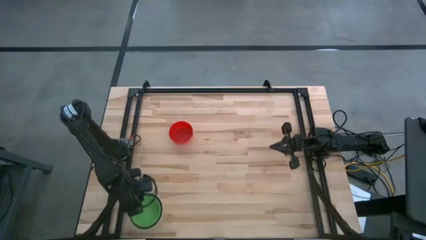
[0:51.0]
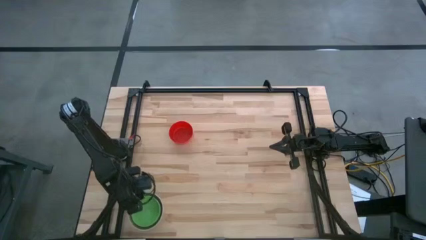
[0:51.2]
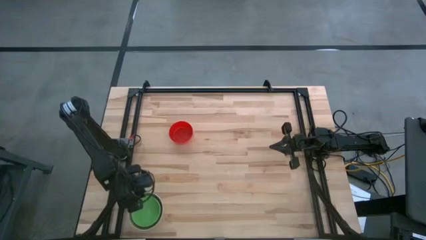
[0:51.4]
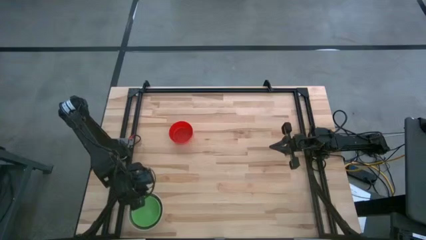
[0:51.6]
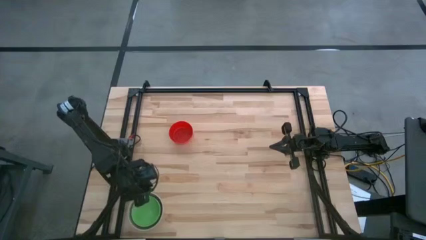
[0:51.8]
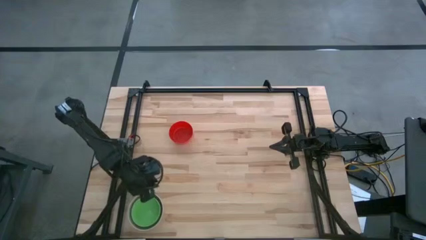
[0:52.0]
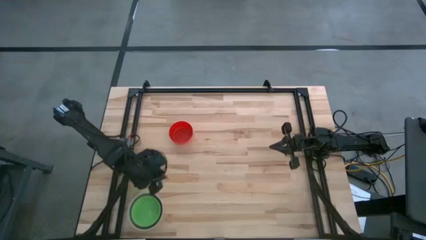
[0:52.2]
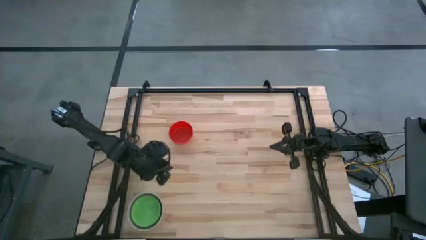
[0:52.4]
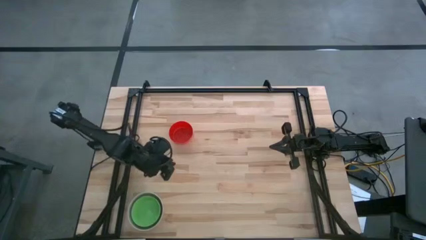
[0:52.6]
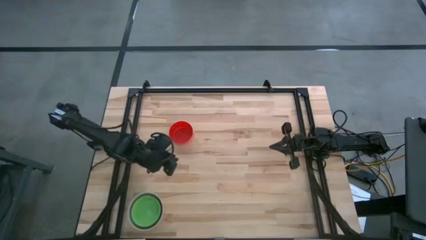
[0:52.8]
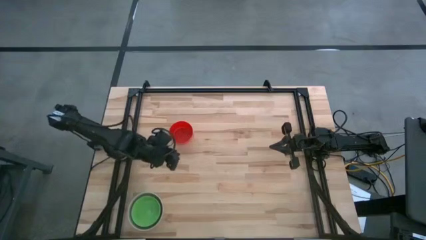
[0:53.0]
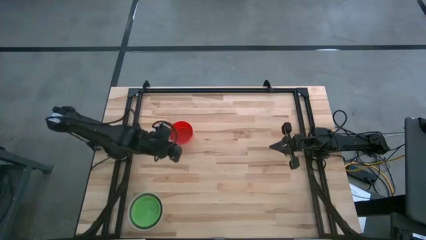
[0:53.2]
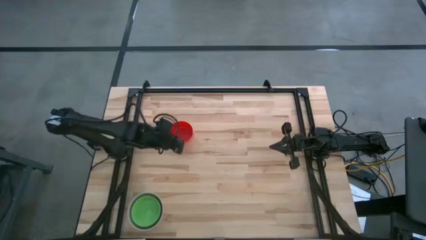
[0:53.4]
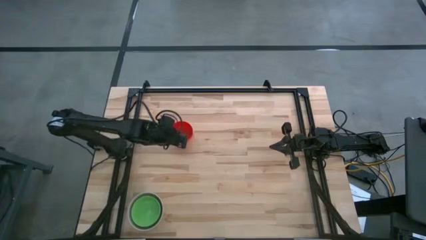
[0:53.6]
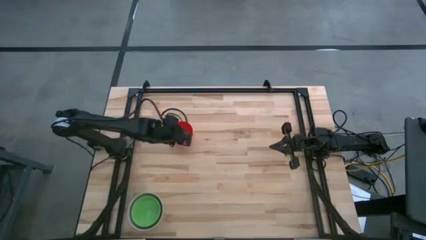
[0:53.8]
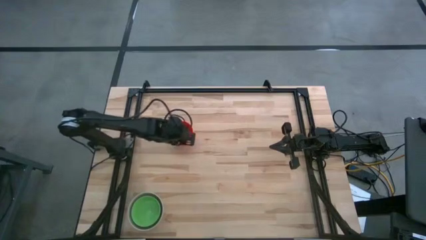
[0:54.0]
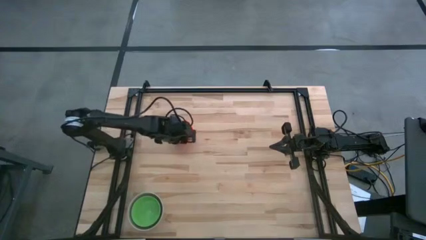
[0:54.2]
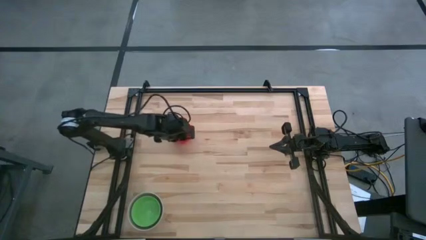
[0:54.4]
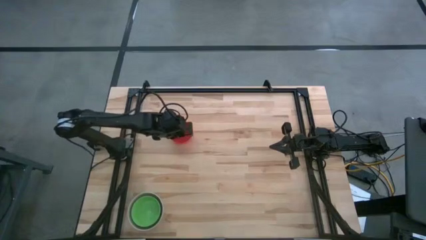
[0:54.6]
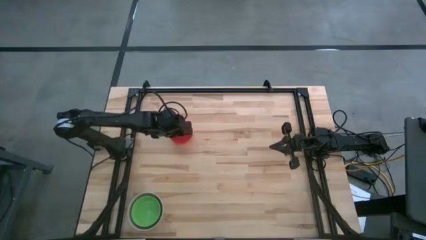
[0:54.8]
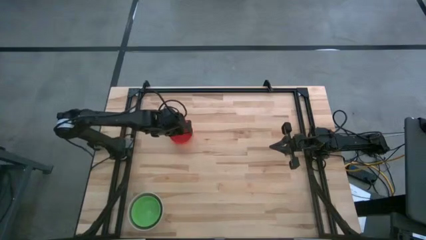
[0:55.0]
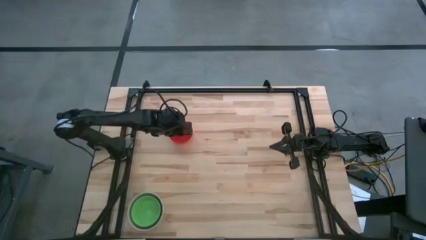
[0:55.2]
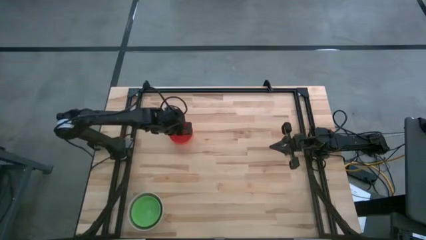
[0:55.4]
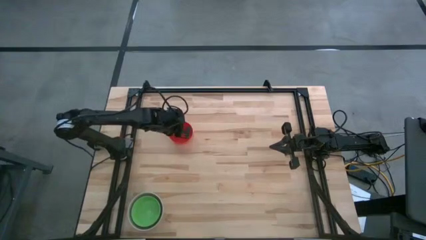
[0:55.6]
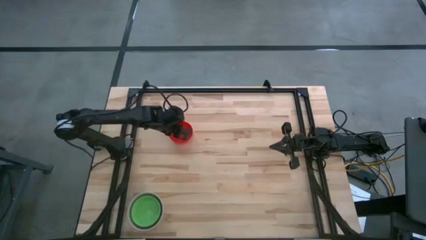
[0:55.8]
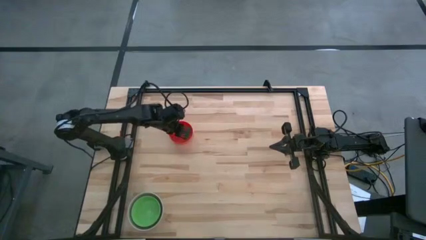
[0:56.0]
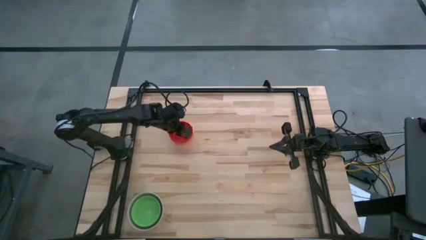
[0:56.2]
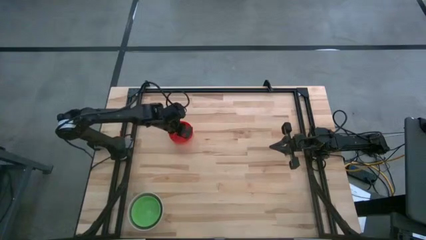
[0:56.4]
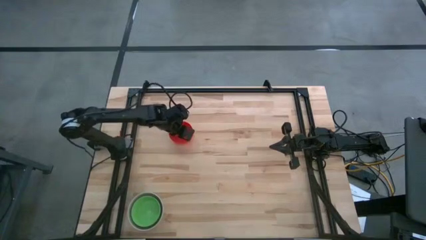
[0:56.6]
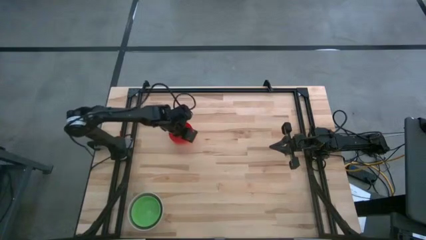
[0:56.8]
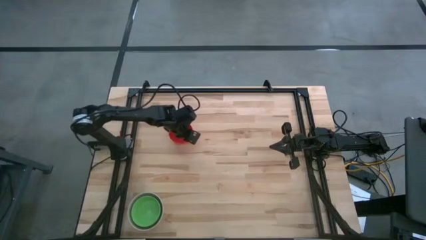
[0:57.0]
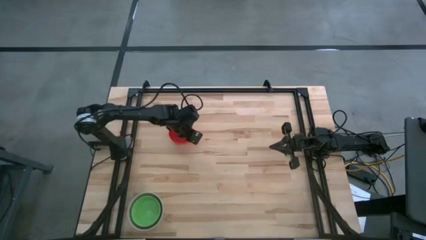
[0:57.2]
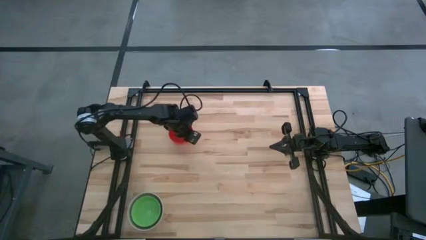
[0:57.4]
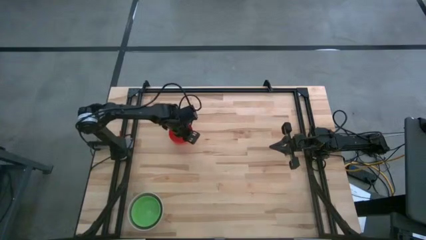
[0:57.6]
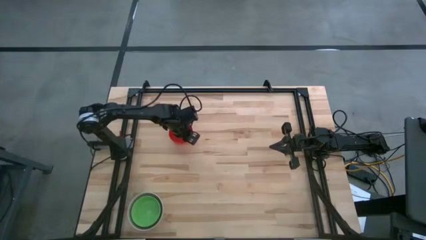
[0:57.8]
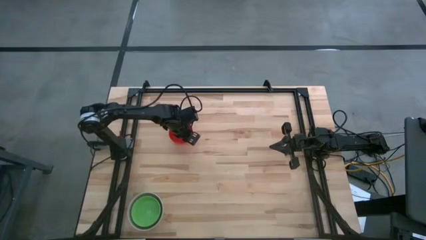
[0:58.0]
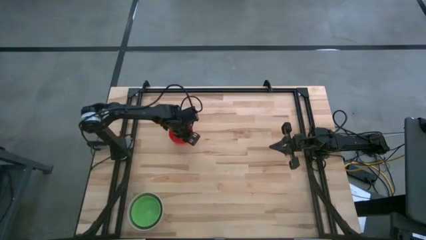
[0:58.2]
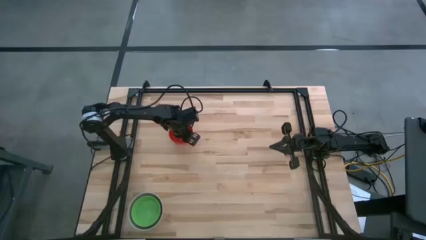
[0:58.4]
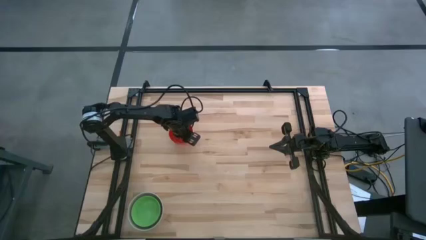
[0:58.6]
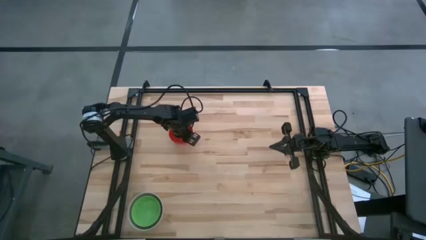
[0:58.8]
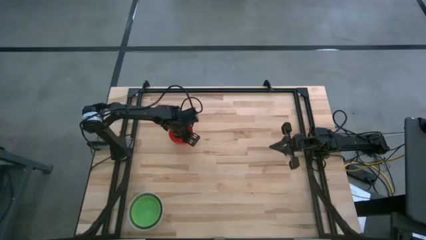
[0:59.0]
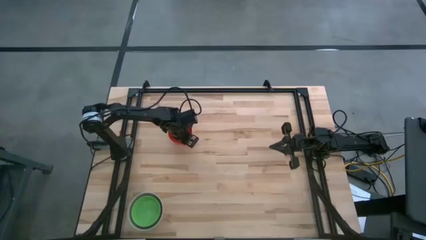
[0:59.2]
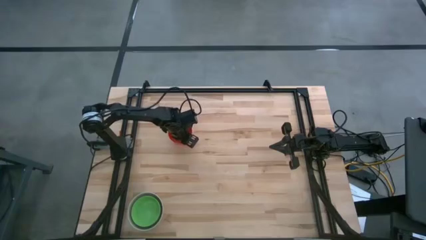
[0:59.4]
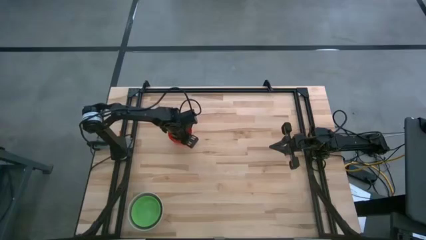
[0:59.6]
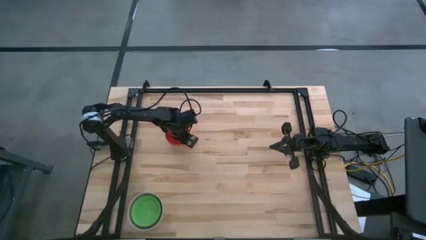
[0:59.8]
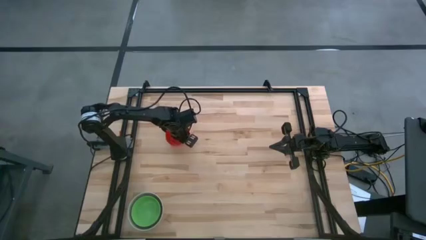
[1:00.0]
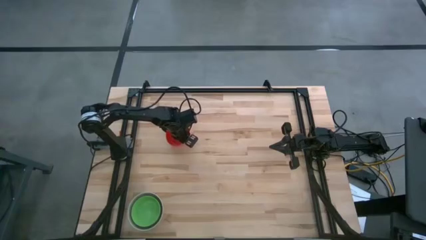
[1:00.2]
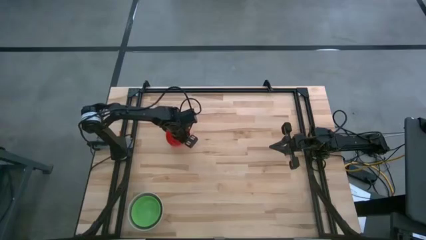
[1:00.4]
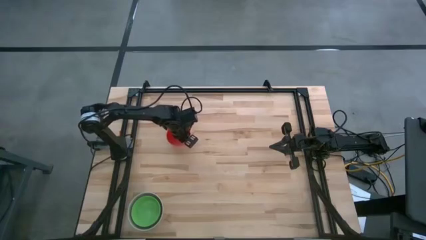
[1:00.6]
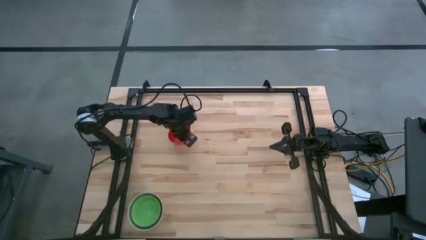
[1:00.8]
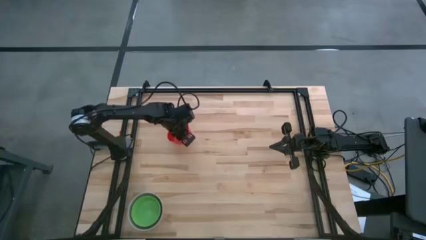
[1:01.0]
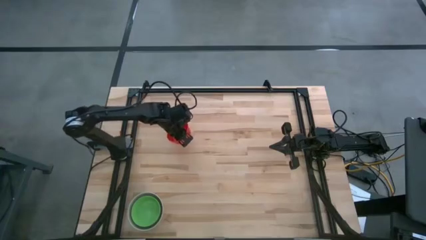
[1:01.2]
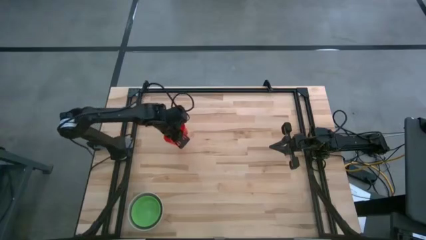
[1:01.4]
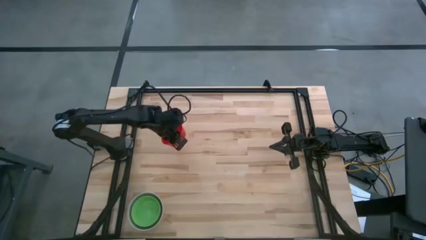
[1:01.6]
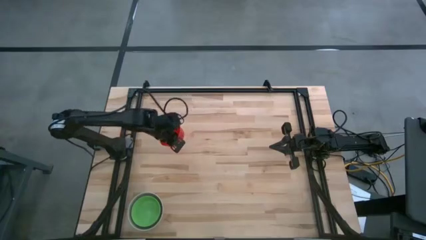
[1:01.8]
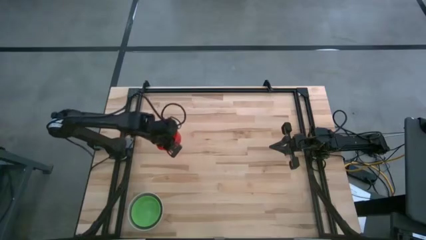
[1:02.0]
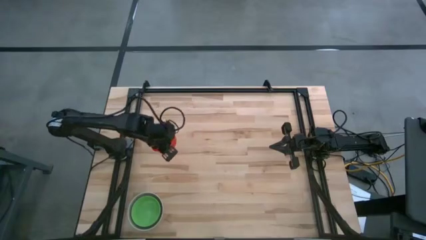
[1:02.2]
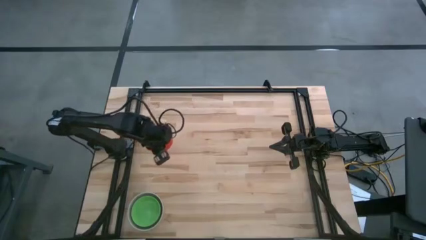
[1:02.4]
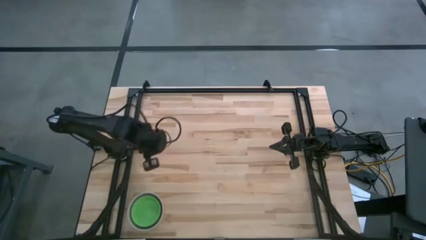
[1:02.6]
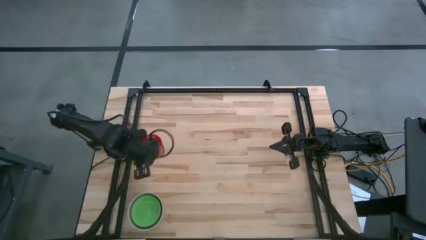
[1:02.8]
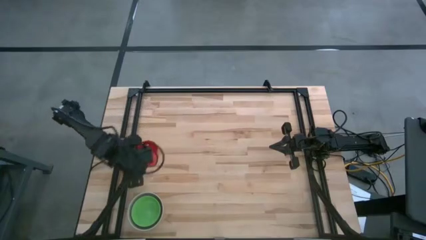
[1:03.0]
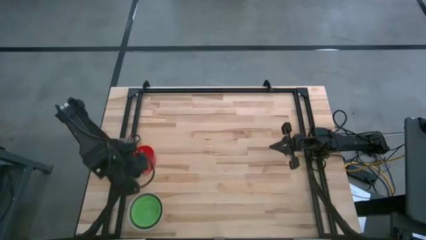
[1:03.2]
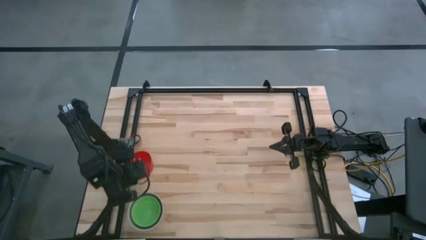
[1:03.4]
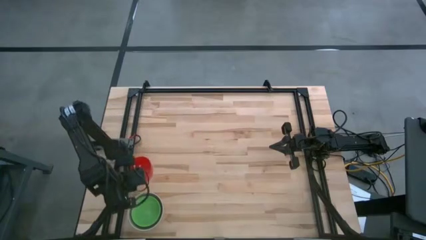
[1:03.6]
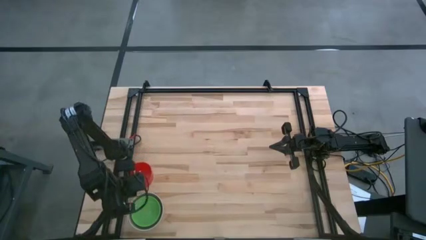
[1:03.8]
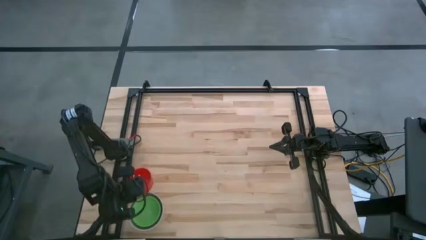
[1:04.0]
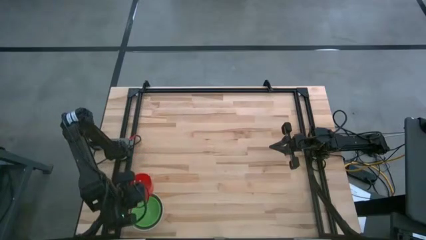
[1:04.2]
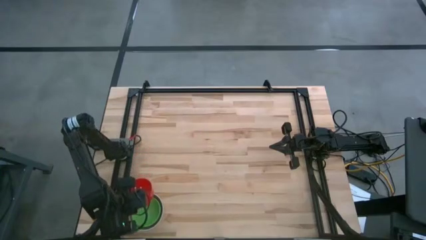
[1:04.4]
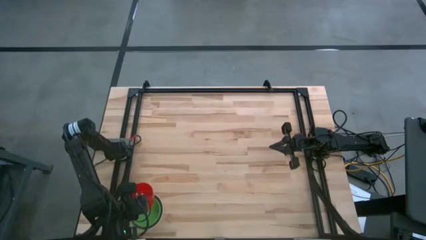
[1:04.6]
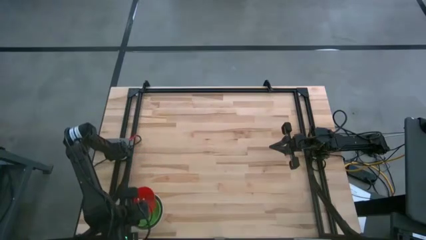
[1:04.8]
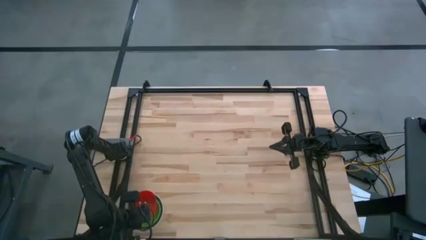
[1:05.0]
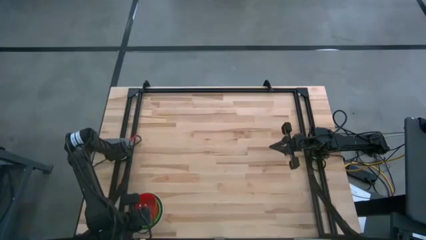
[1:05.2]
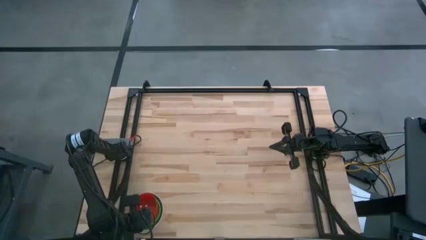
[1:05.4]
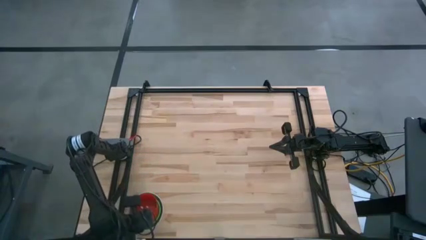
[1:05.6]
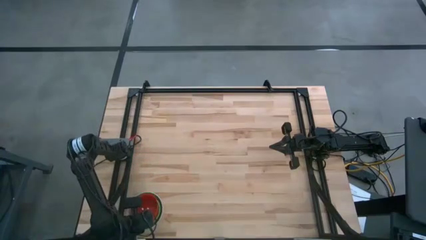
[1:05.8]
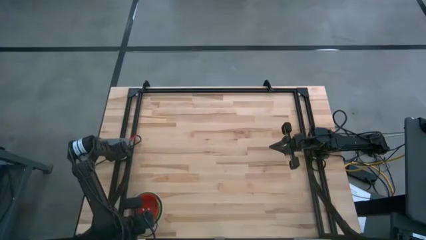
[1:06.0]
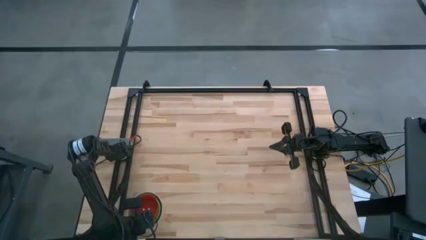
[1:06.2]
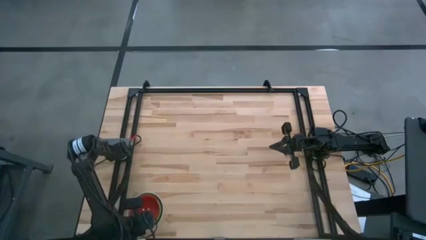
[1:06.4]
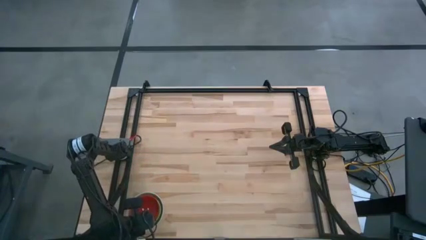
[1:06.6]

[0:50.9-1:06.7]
Stack the red bowl on top of the green bowl
